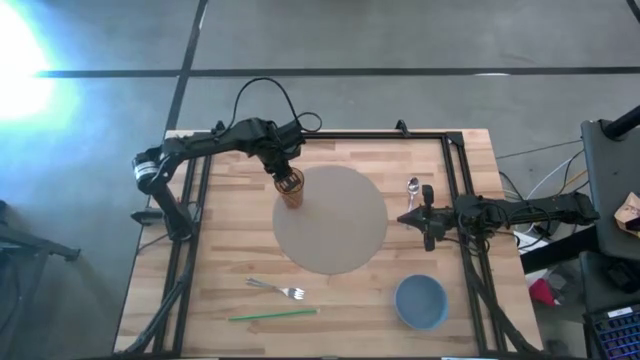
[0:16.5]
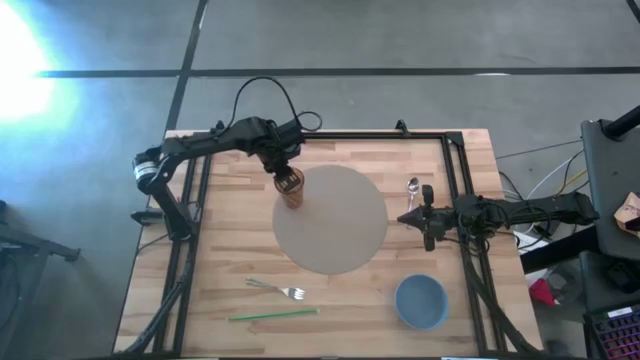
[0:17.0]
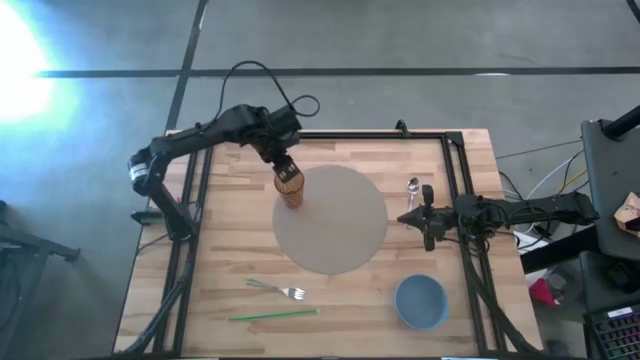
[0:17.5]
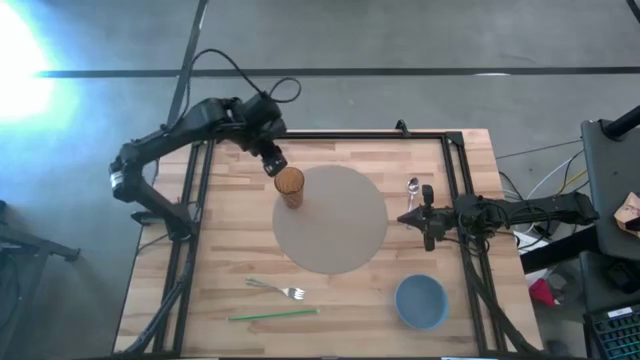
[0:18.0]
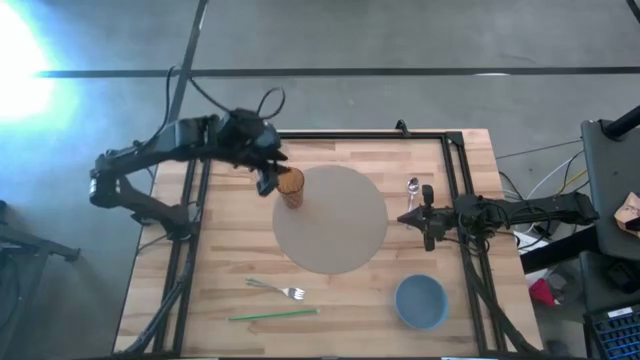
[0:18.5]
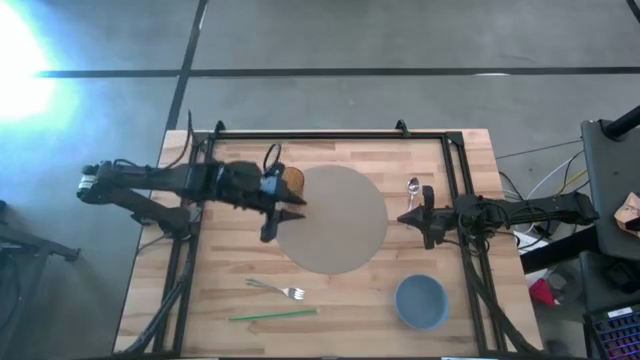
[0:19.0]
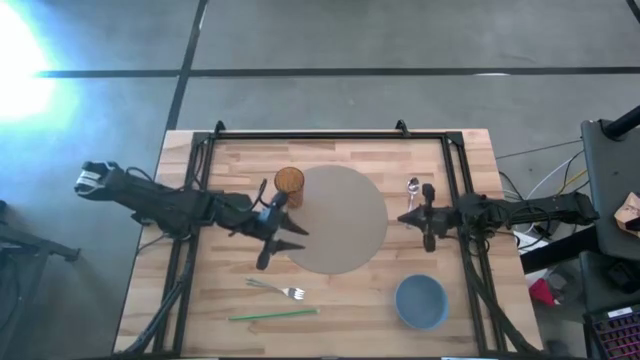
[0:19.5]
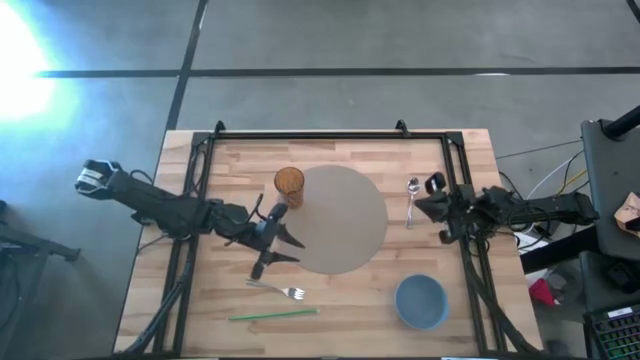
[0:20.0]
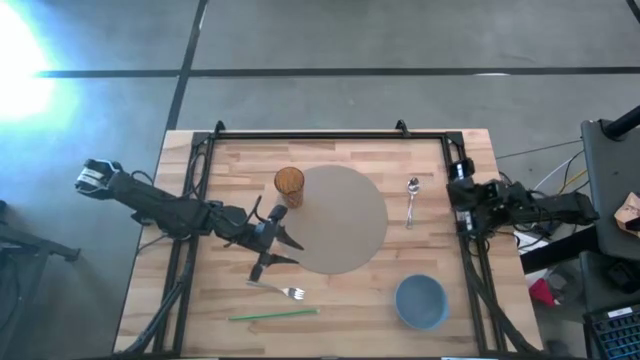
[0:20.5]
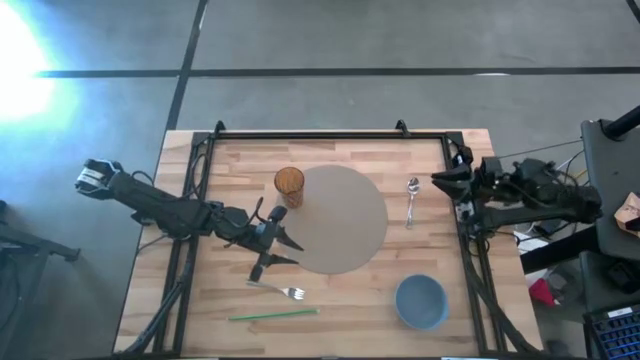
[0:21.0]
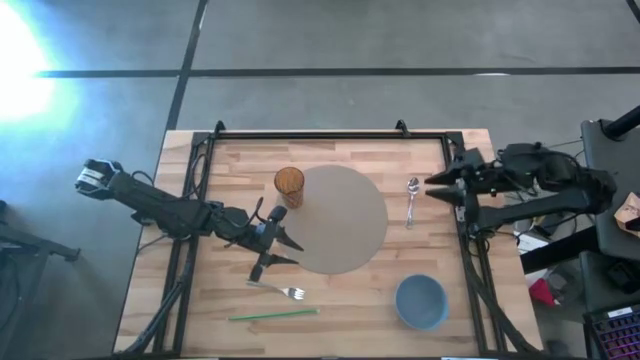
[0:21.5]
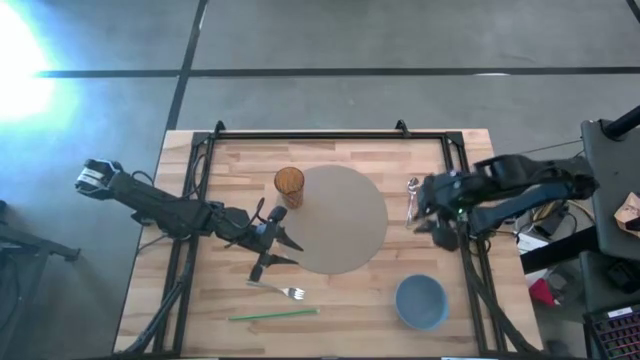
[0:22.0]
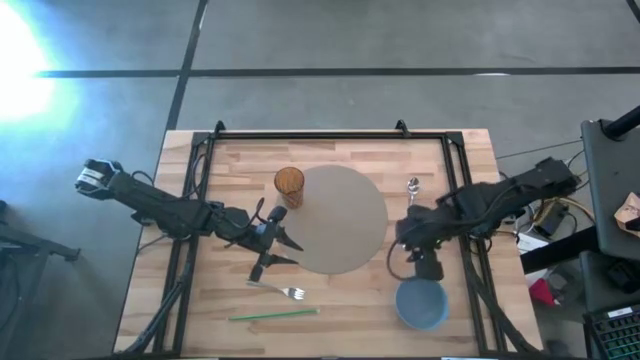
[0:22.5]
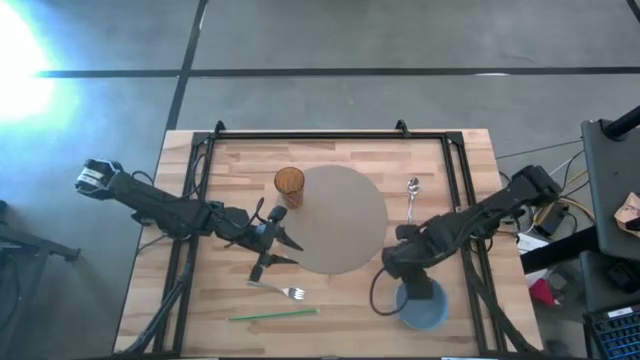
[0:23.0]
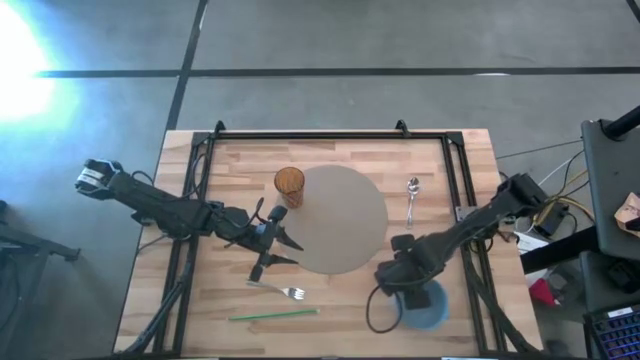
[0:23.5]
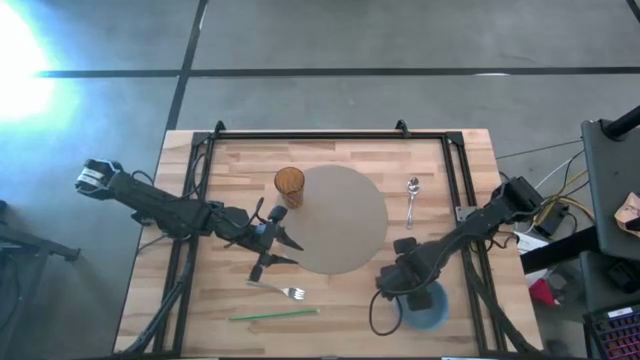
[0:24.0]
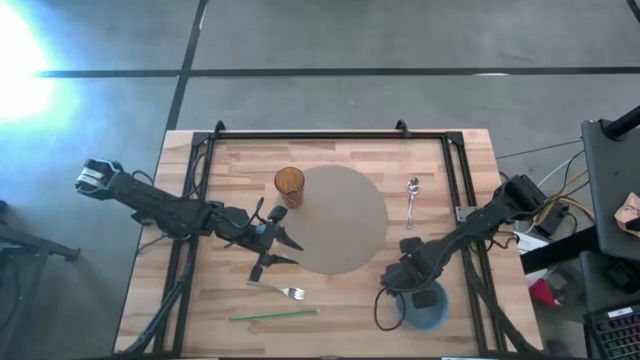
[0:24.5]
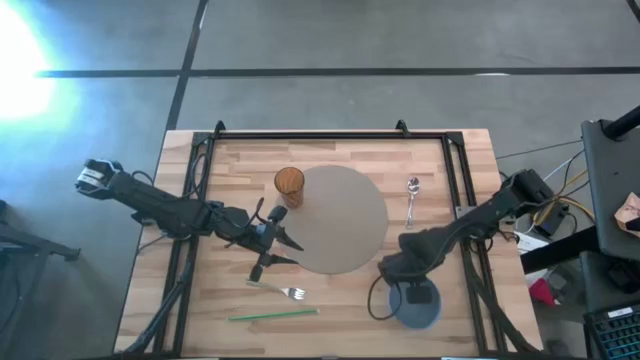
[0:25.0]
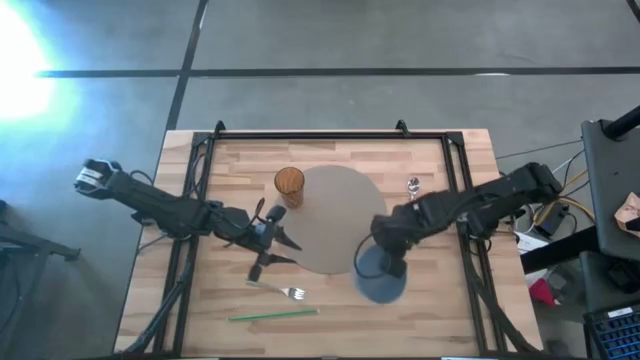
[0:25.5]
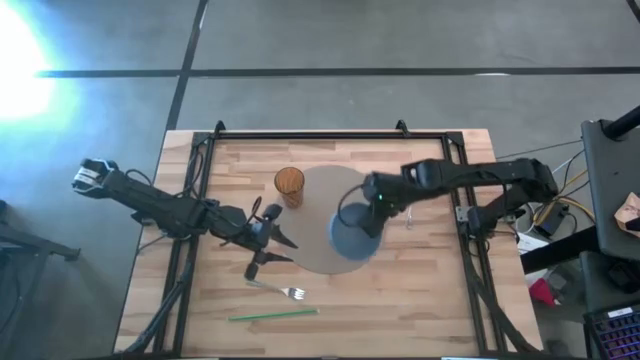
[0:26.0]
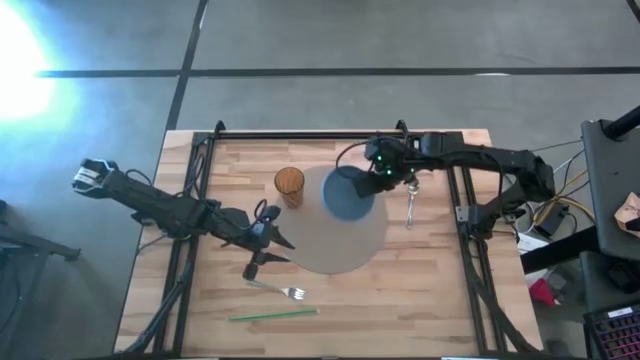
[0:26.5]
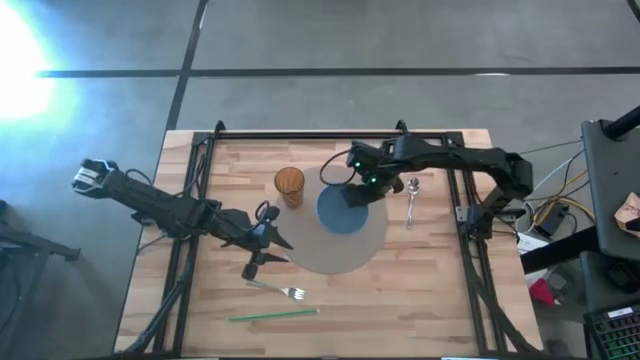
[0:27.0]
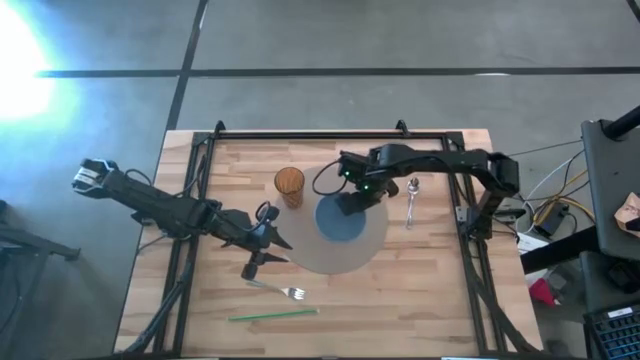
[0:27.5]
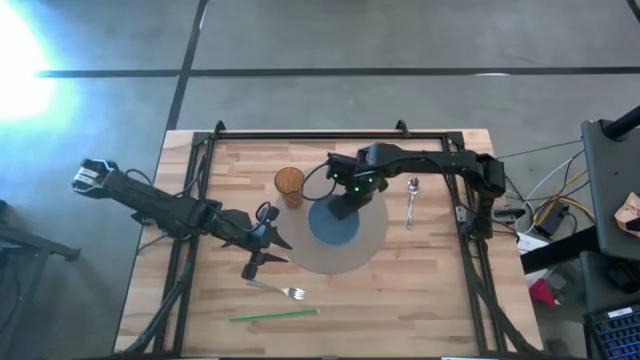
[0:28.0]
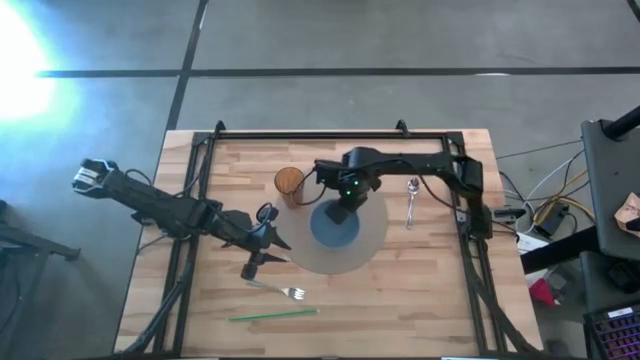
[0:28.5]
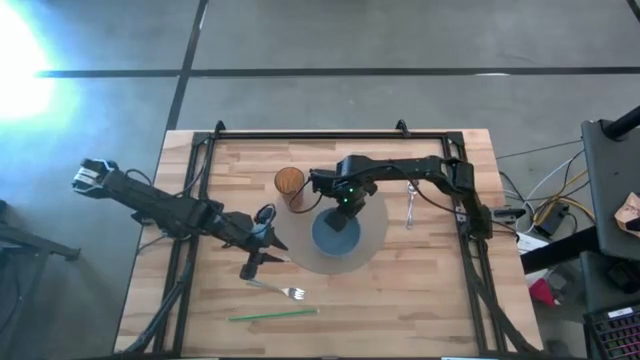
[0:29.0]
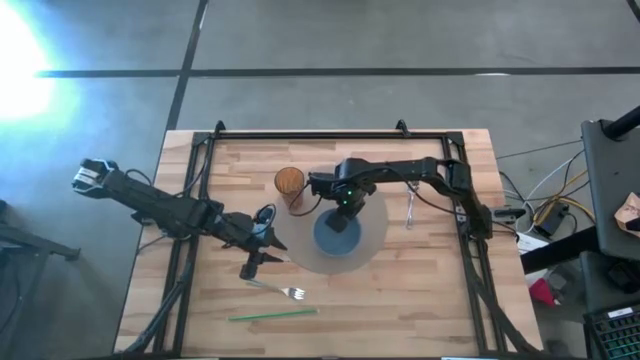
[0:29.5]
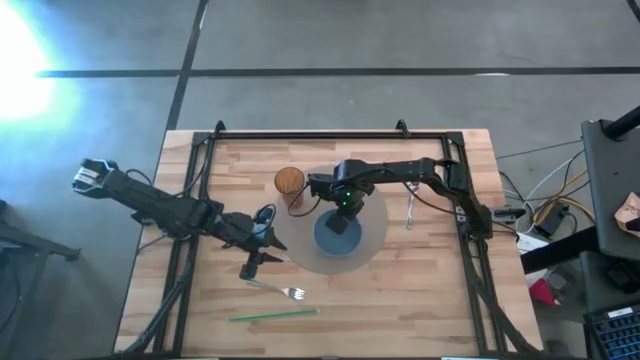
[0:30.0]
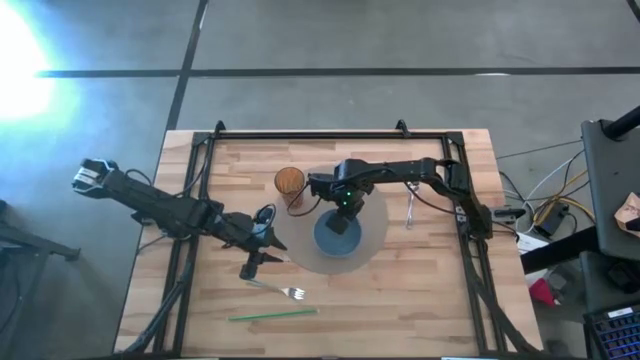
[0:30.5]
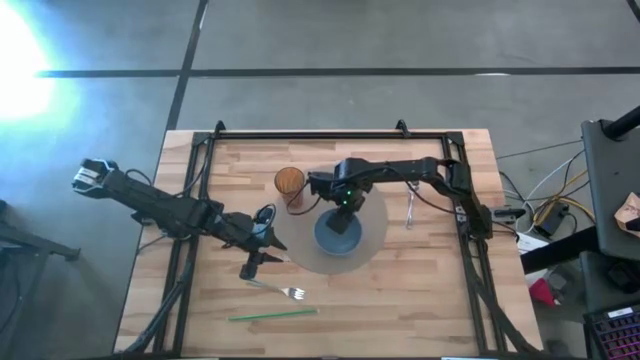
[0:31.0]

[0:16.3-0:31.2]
Task: Pick & Place Utensil
Put the bowl on the bottom center of the mat

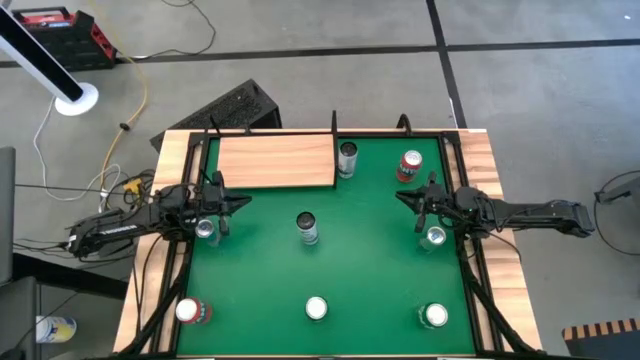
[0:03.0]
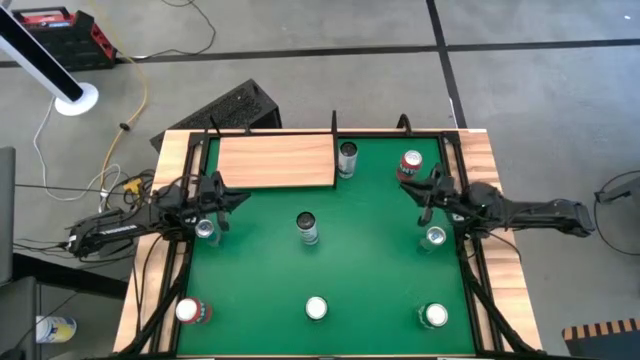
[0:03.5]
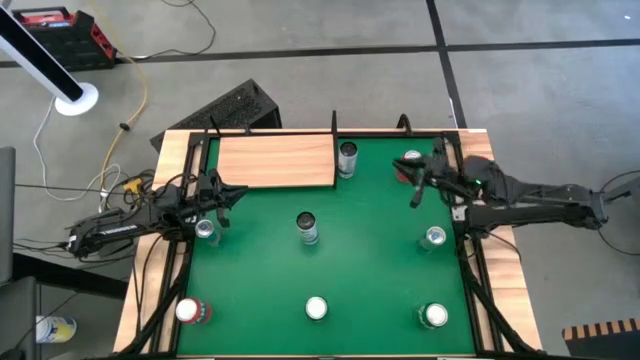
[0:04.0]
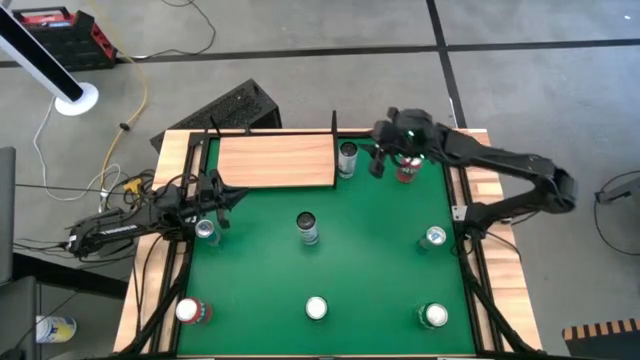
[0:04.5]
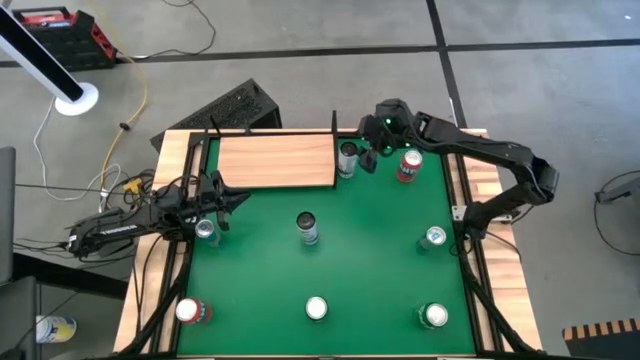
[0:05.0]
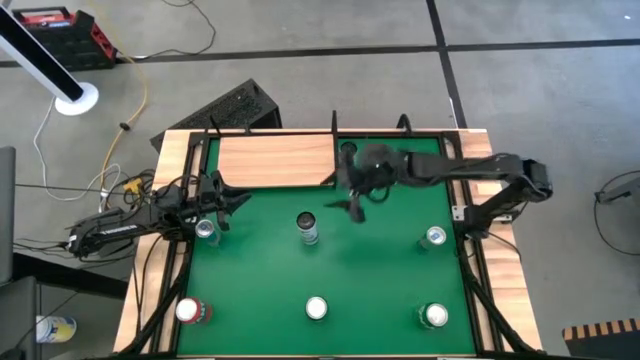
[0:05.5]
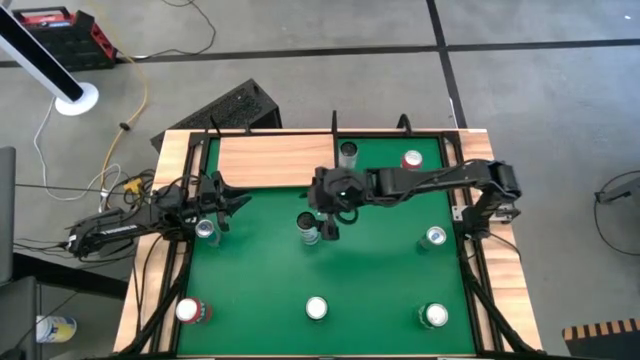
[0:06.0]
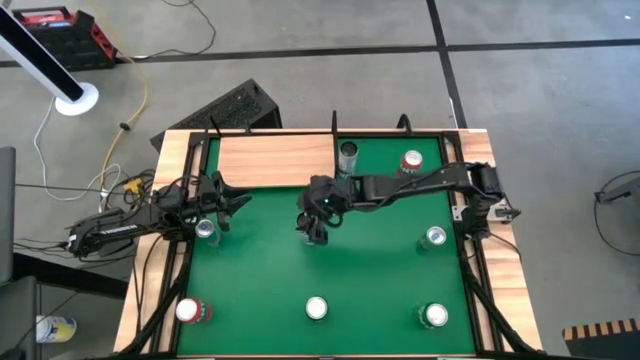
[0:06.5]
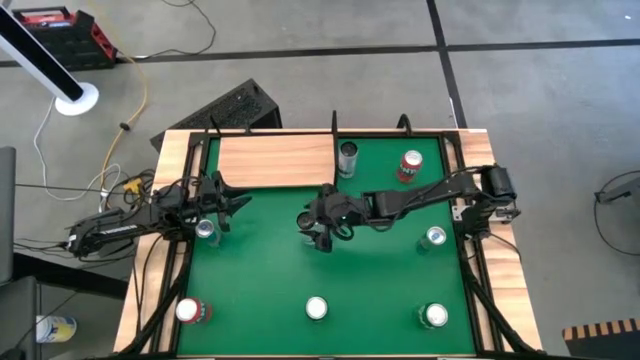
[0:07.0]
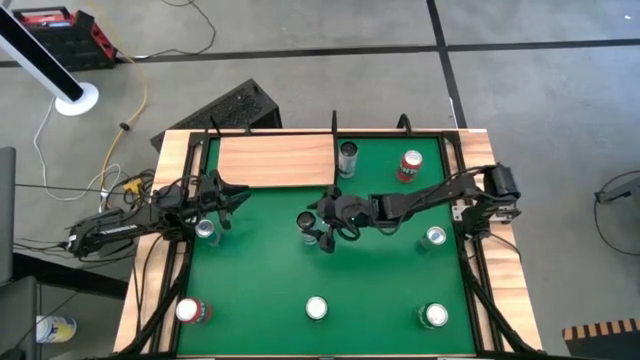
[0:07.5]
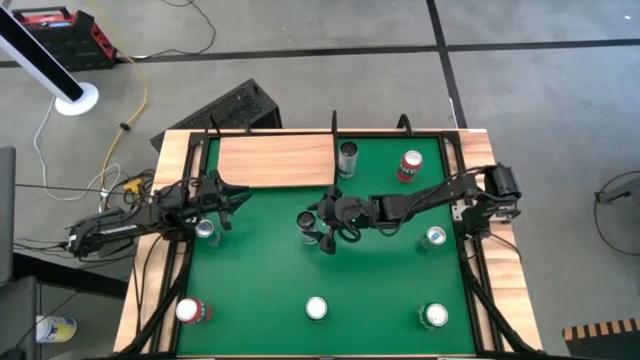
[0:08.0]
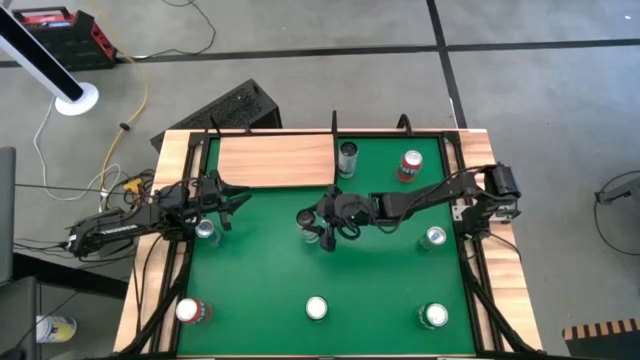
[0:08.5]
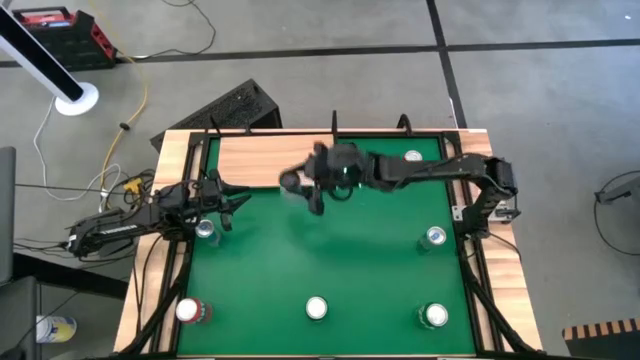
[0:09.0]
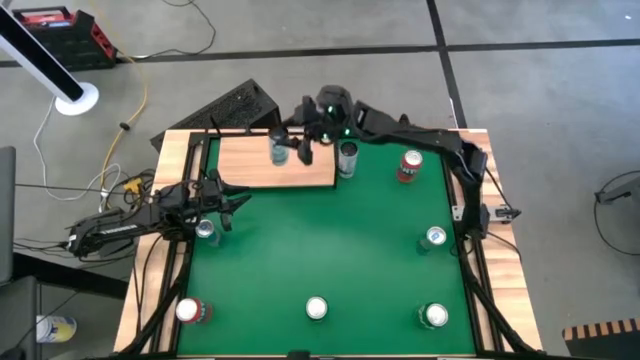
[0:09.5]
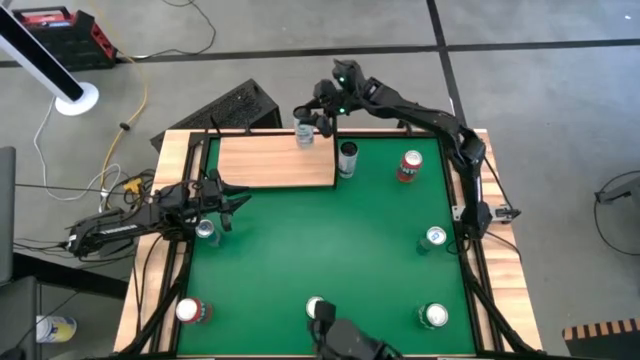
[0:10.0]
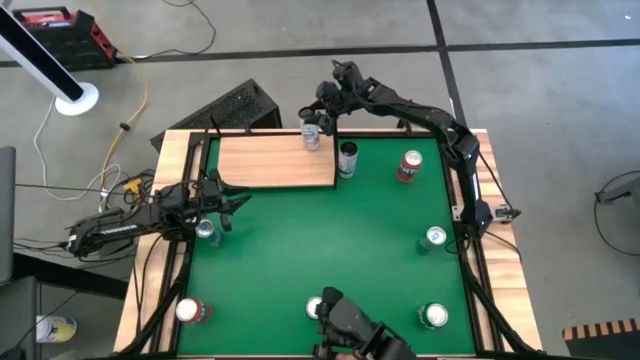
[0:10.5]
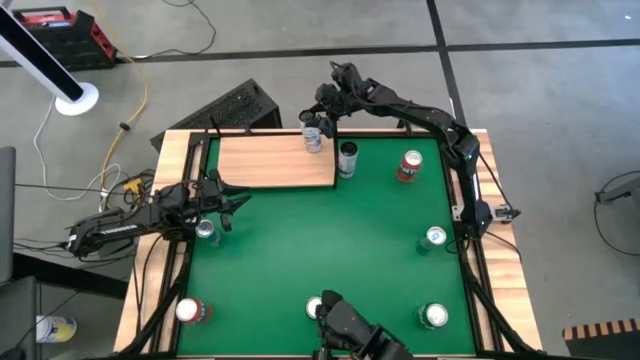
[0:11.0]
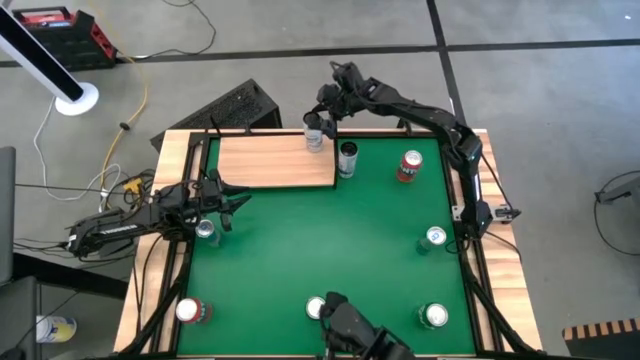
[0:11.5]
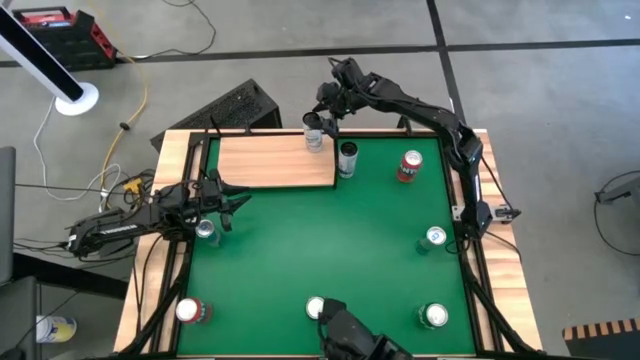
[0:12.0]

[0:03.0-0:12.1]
Task: Place canned beverage on shelf
Put the bottom white blue soda can on the shelf
